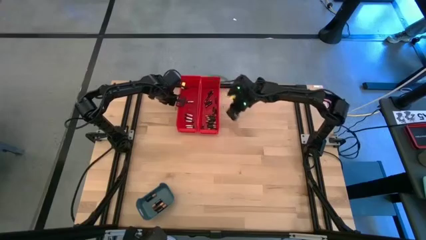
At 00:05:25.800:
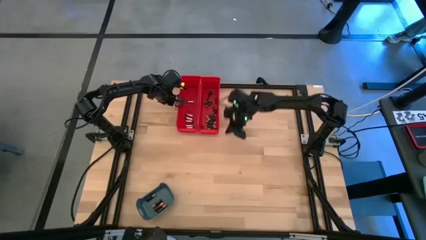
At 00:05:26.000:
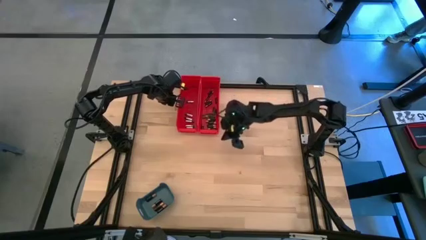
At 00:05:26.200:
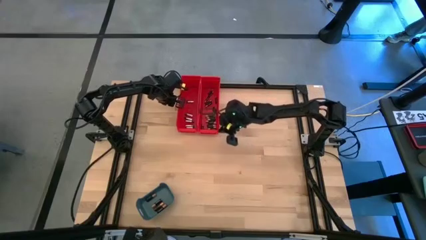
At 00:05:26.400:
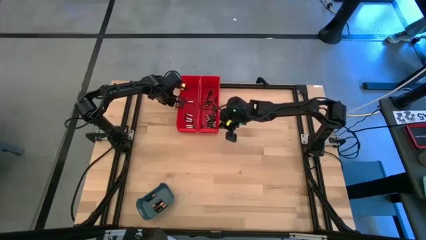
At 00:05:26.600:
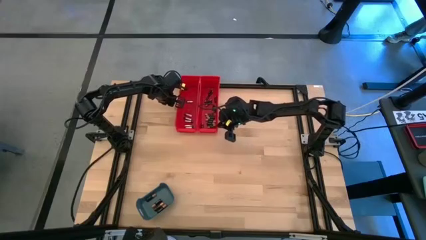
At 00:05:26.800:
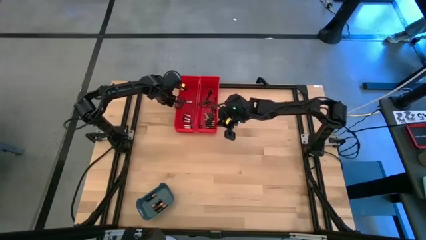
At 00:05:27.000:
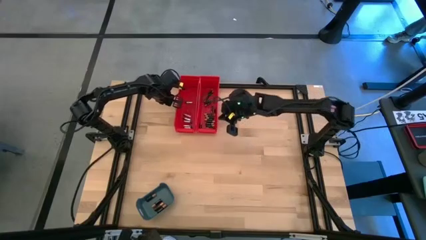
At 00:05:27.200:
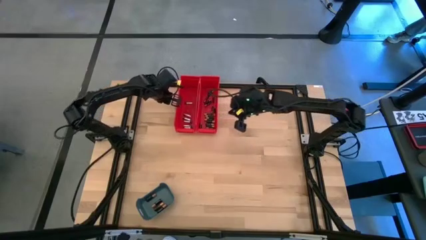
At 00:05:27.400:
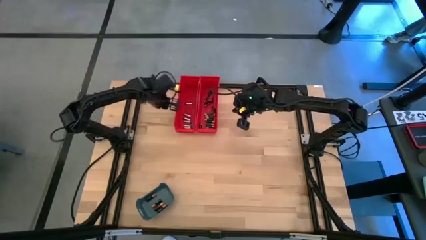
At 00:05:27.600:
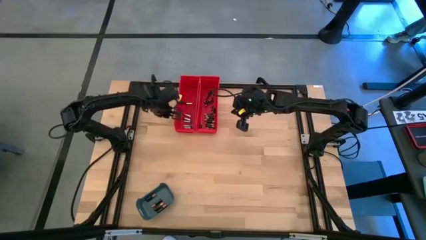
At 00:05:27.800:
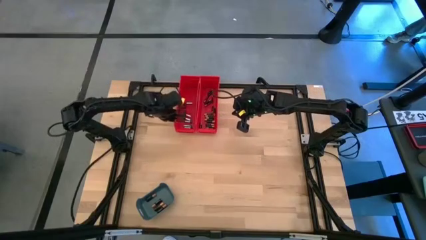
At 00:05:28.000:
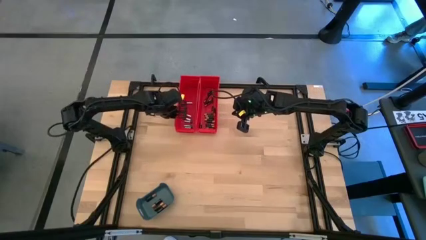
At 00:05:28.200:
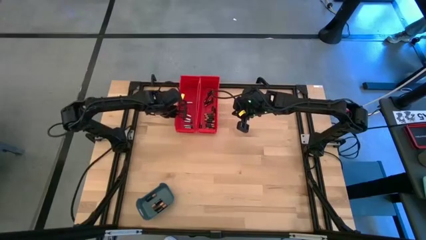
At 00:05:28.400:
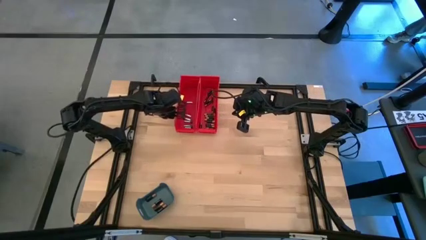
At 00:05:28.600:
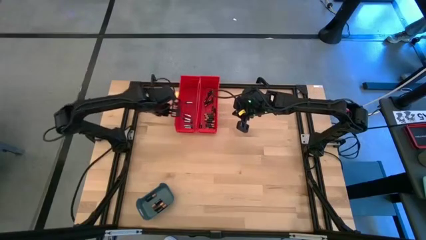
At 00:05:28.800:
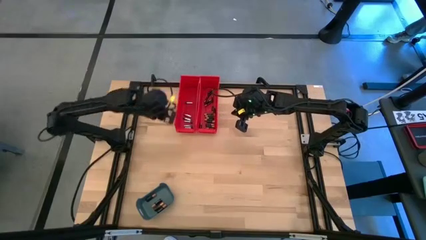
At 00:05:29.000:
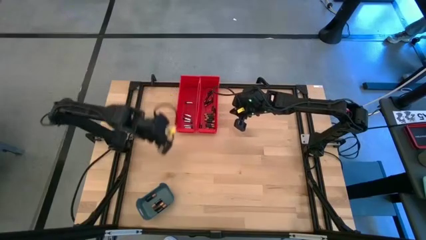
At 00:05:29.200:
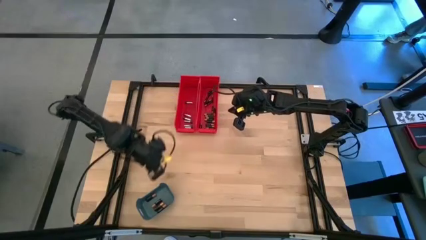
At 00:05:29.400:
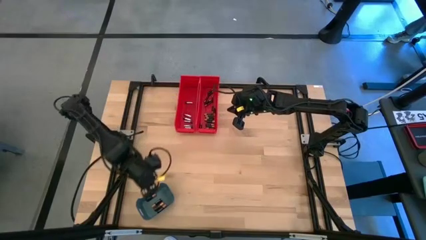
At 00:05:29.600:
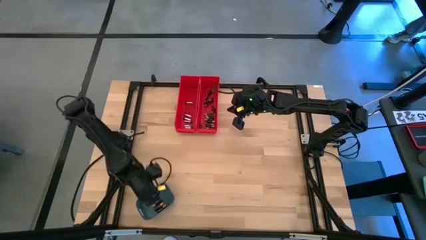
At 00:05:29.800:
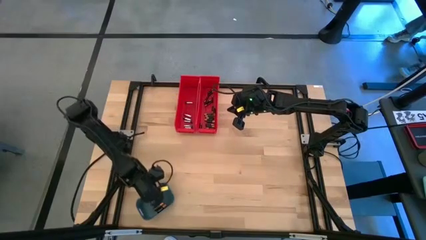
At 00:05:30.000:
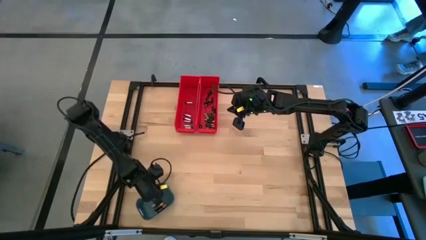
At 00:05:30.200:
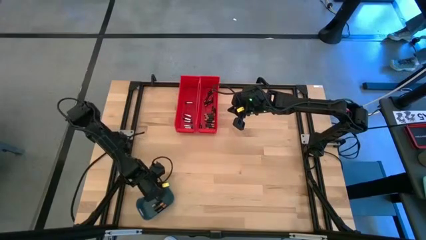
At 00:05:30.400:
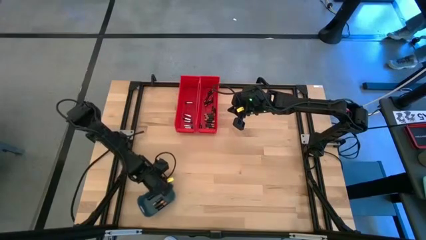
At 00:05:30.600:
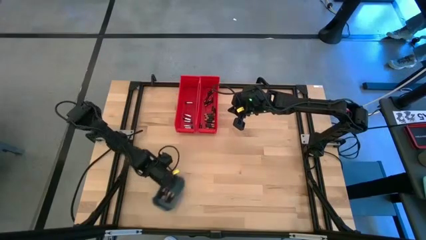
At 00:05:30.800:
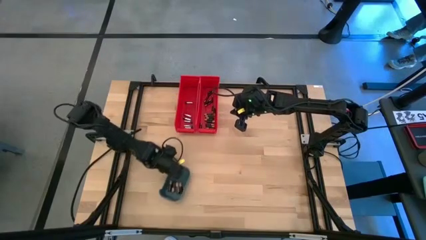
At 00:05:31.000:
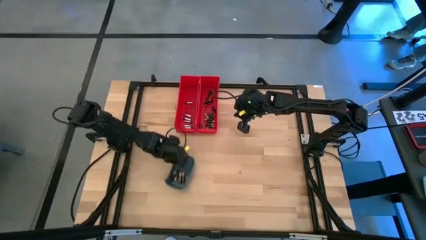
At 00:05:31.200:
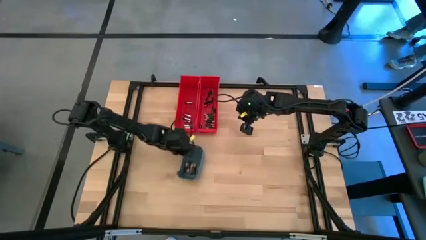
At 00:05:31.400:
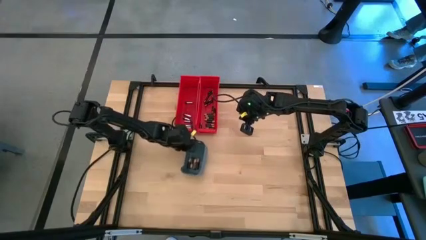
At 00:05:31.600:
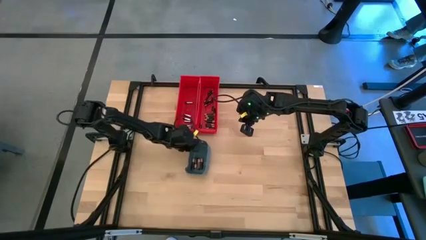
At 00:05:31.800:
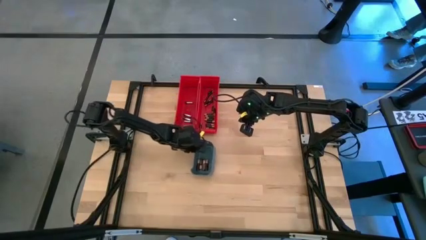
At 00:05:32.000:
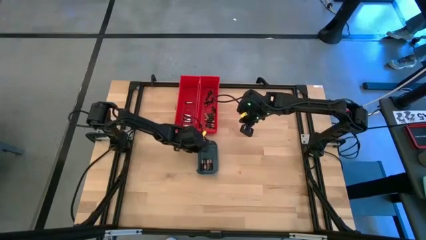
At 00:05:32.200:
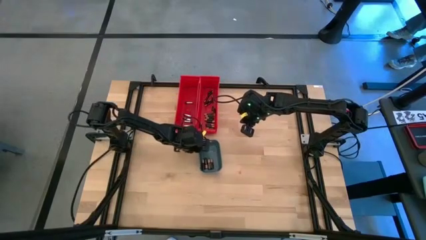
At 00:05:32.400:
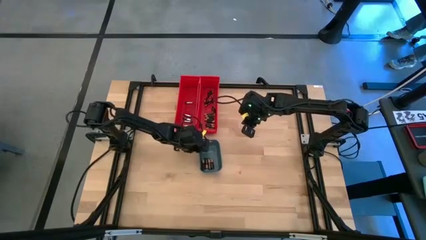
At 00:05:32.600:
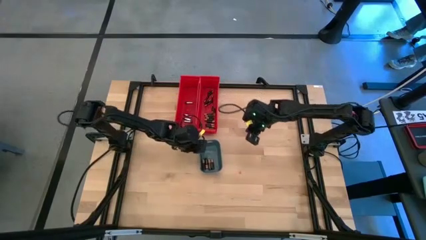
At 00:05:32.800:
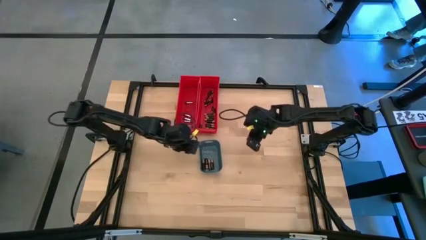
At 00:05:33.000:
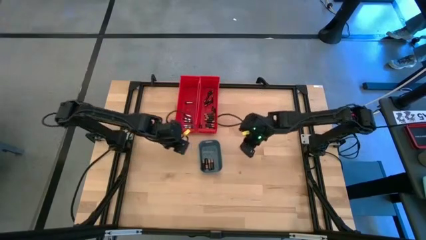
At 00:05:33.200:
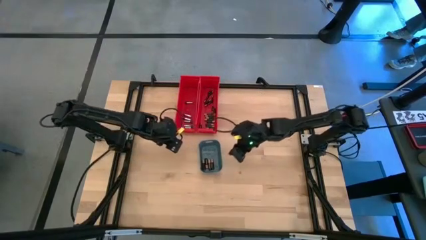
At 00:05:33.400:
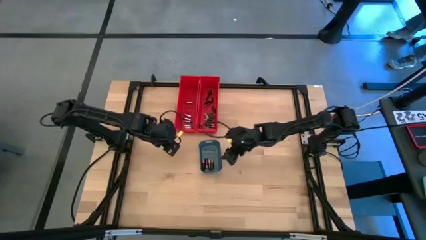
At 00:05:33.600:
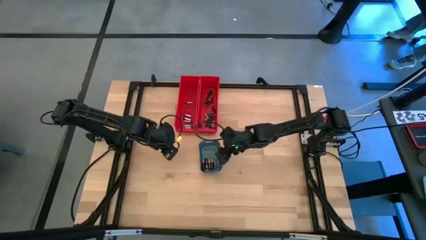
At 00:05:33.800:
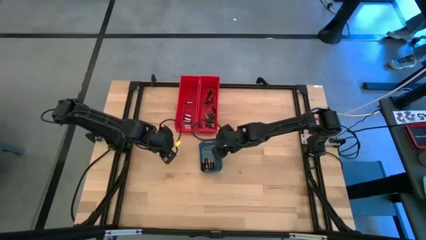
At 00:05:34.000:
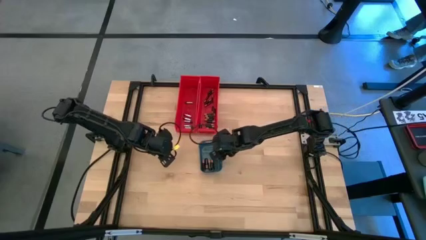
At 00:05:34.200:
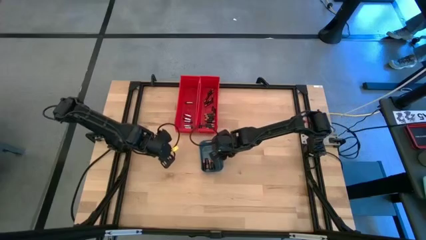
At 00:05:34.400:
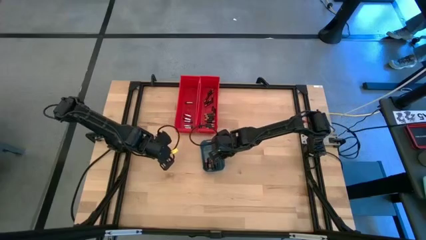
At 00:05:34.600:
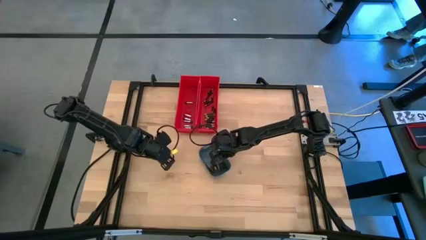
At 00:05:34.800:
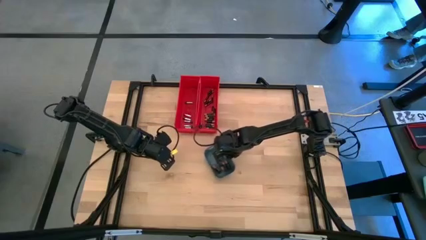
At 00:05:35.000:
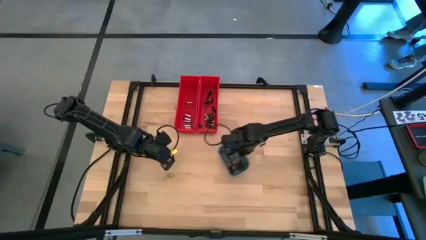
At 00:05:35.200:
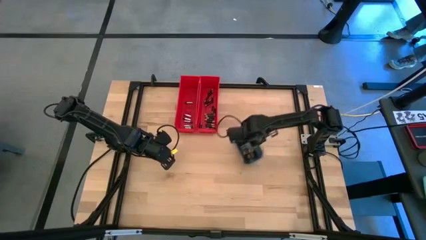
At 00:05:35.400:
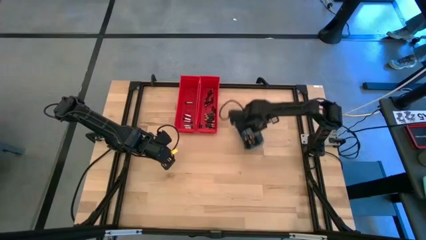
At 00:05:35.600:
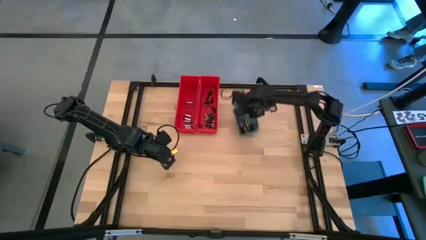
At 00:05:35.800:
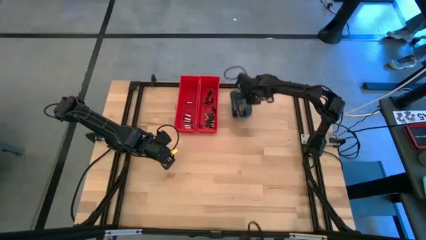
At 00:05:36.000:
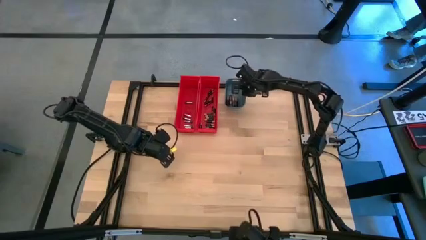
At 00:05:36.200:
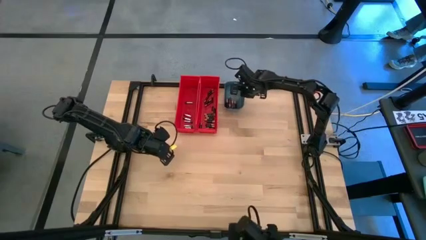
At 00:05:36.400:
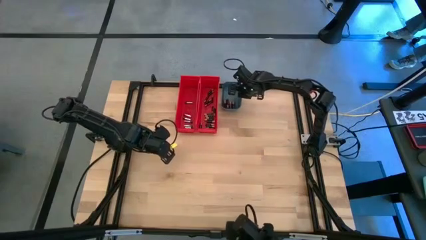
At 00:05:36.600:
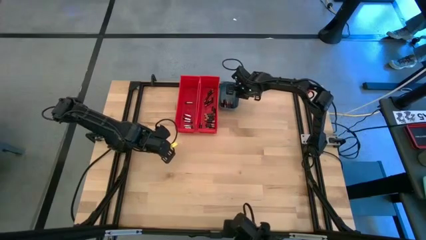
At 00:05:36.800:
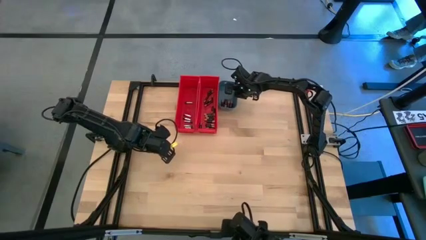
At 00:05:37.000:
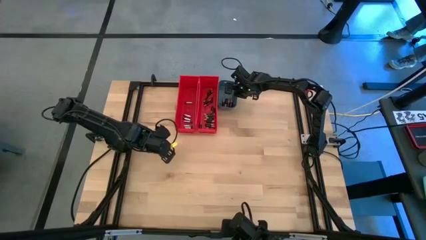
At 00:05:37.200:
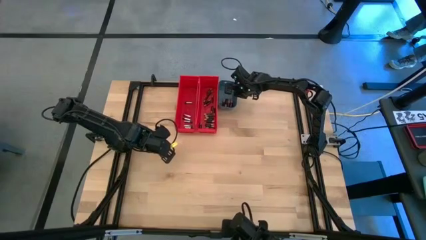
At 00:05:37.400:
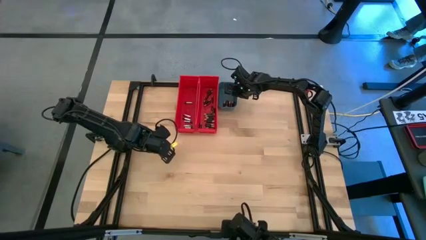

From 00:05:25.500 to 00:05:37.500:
Task: Sort batteries
Move the bins to the top center of the table
